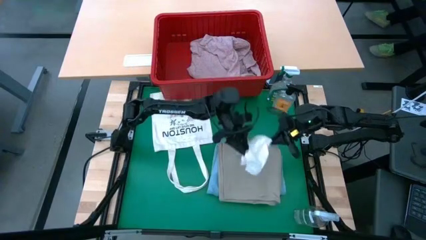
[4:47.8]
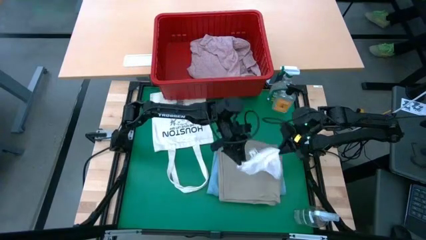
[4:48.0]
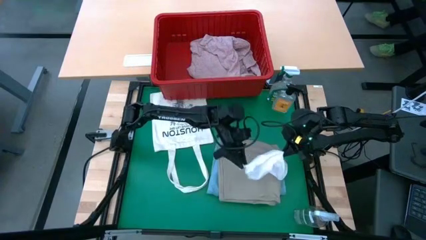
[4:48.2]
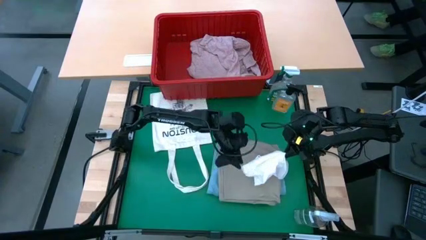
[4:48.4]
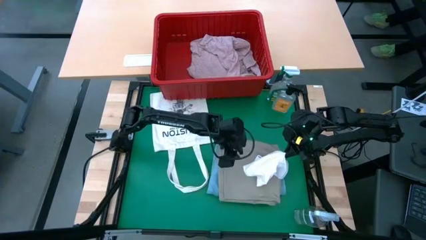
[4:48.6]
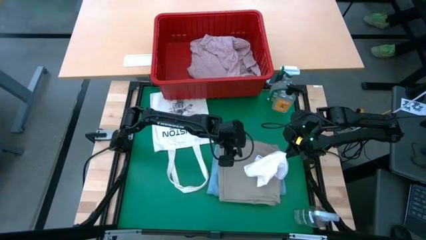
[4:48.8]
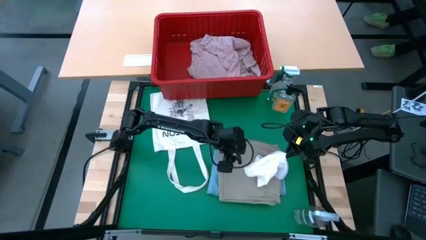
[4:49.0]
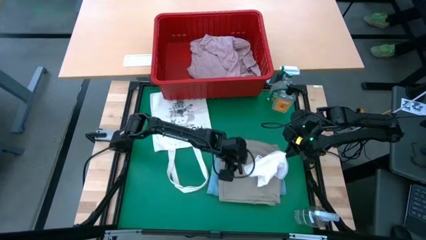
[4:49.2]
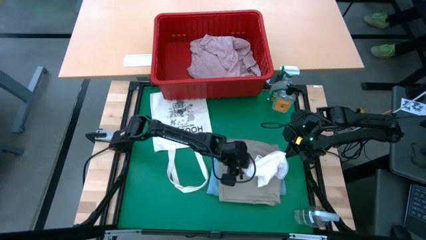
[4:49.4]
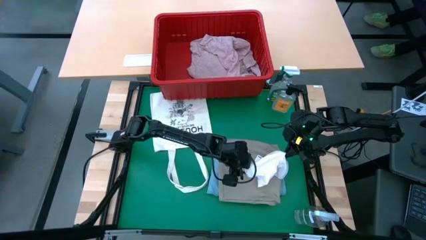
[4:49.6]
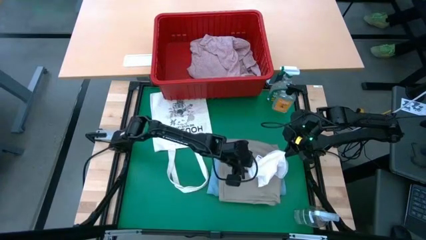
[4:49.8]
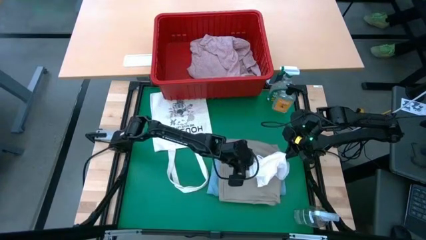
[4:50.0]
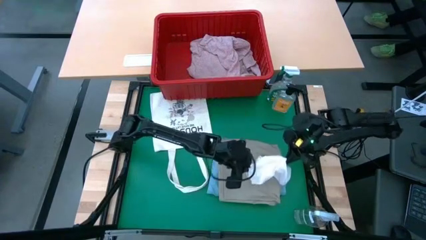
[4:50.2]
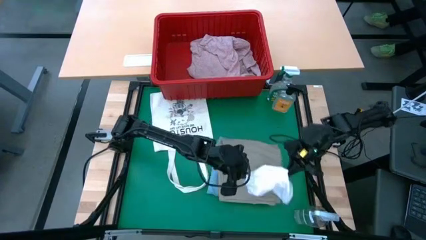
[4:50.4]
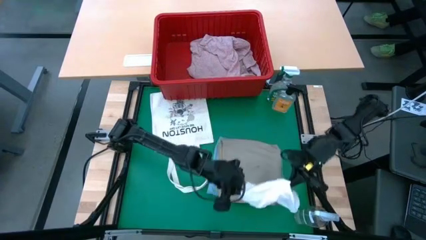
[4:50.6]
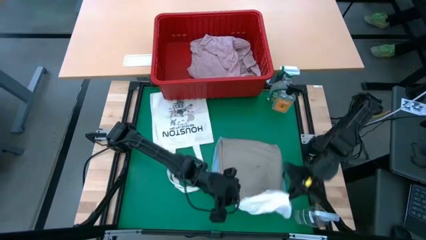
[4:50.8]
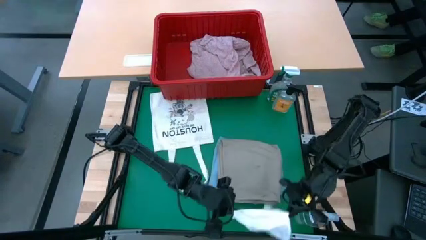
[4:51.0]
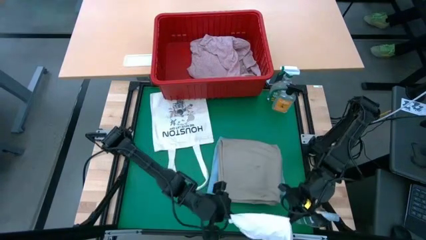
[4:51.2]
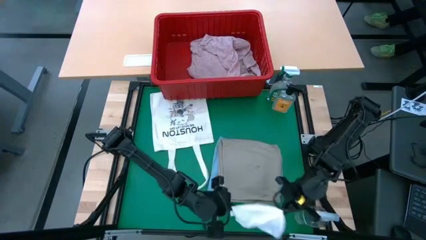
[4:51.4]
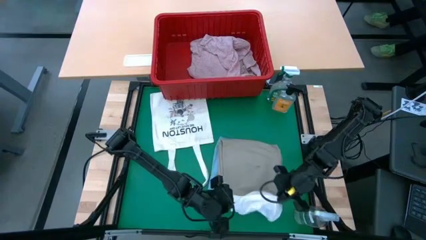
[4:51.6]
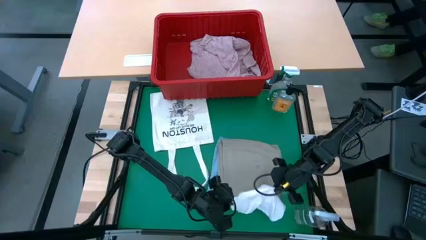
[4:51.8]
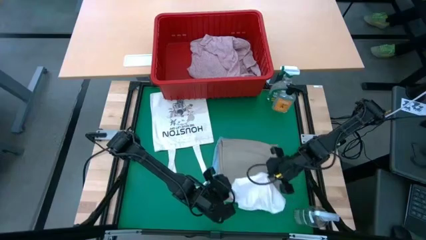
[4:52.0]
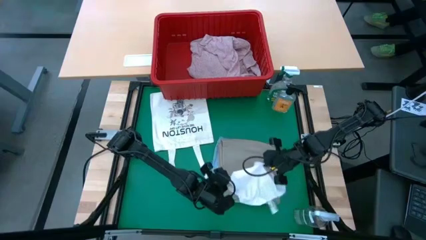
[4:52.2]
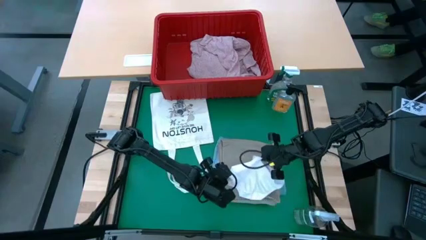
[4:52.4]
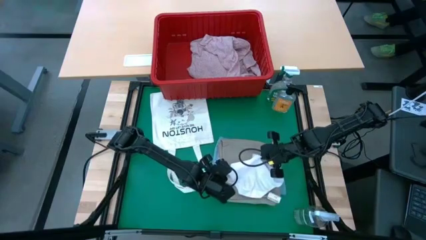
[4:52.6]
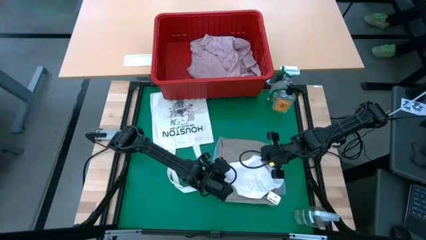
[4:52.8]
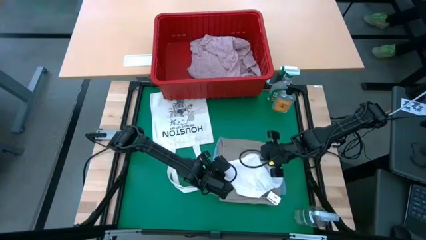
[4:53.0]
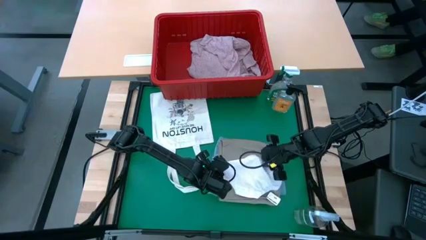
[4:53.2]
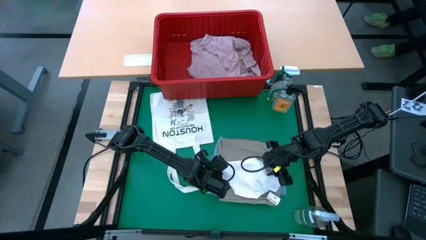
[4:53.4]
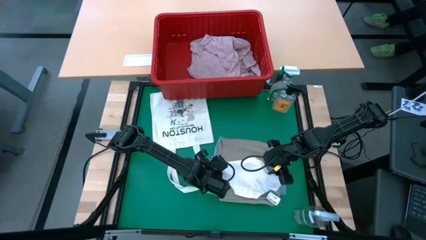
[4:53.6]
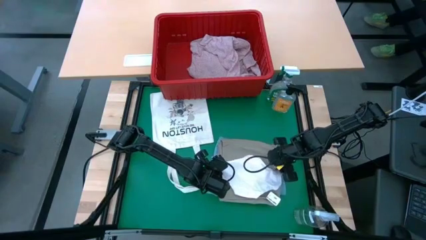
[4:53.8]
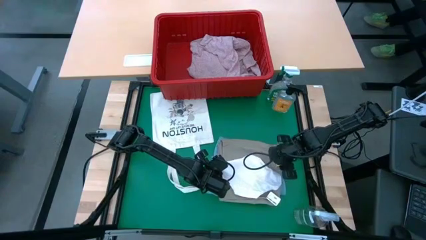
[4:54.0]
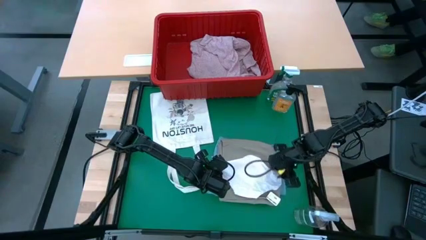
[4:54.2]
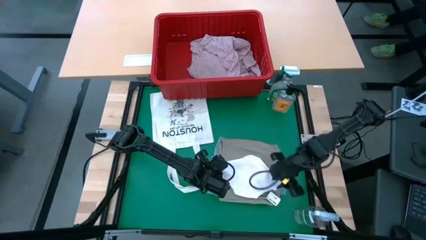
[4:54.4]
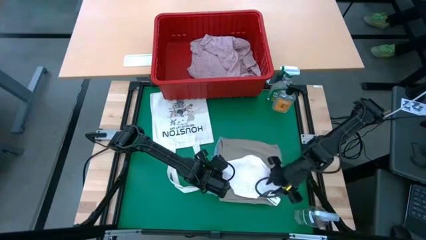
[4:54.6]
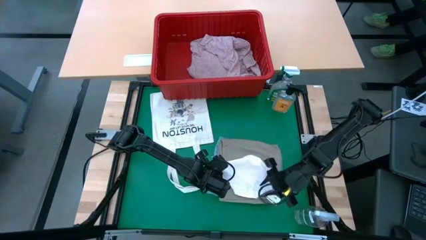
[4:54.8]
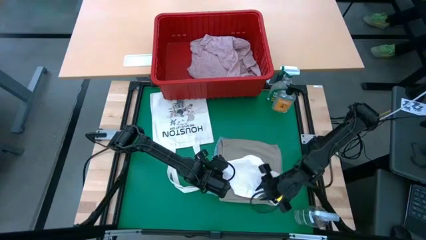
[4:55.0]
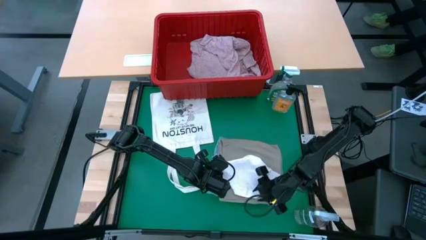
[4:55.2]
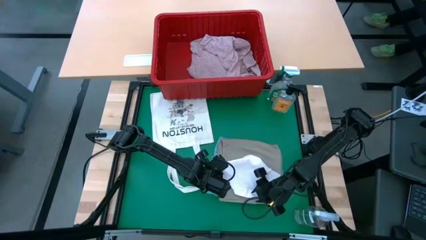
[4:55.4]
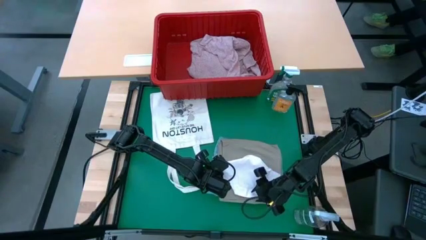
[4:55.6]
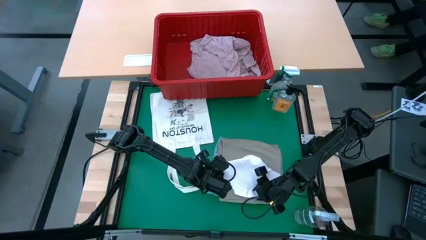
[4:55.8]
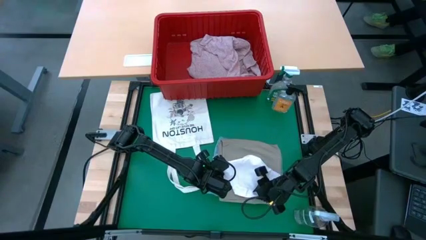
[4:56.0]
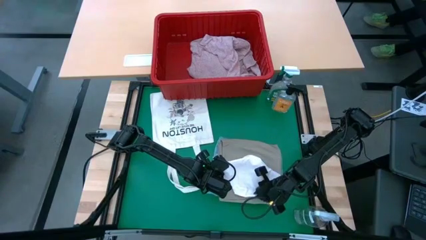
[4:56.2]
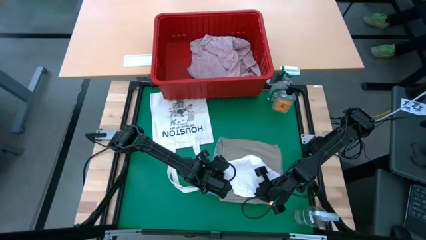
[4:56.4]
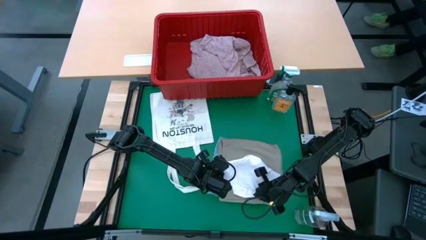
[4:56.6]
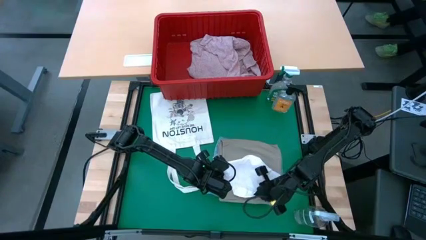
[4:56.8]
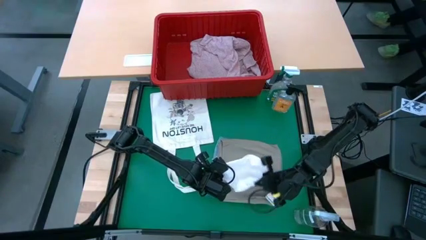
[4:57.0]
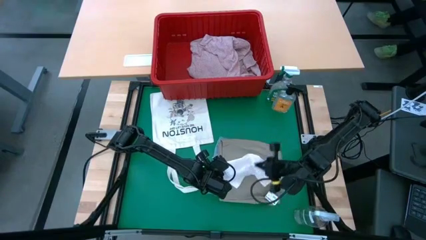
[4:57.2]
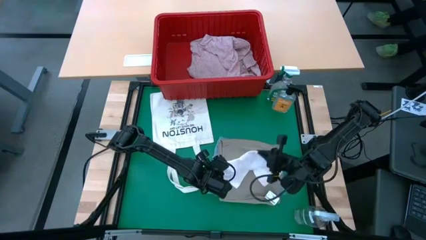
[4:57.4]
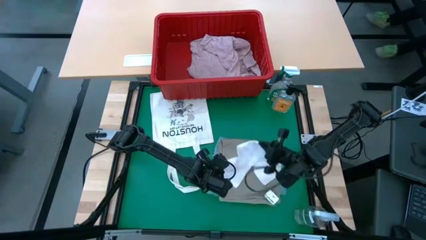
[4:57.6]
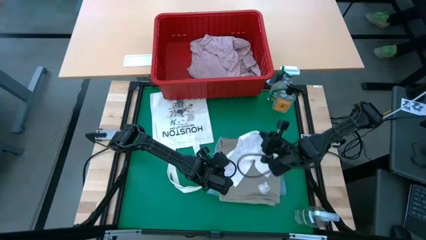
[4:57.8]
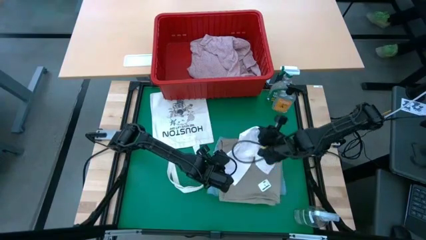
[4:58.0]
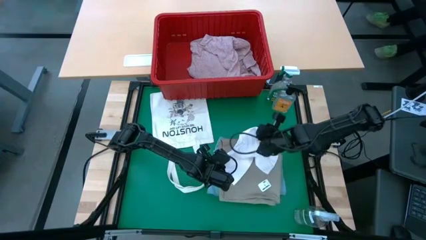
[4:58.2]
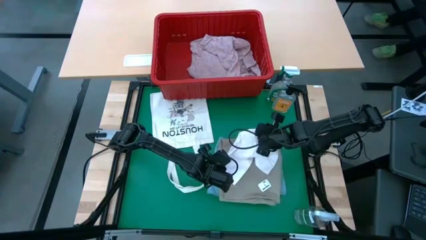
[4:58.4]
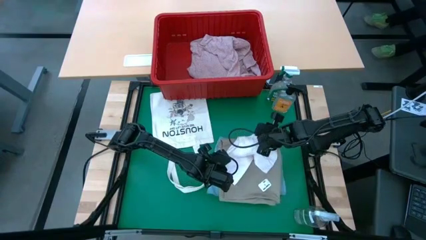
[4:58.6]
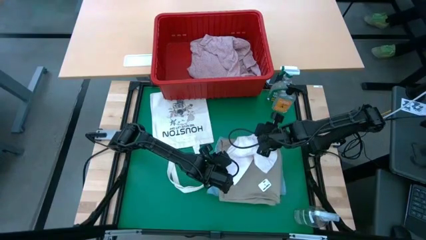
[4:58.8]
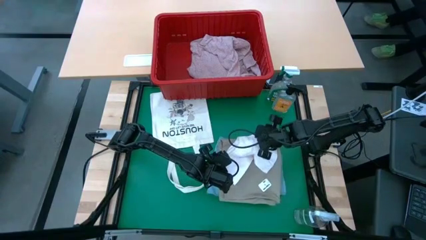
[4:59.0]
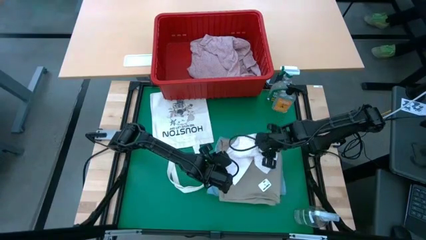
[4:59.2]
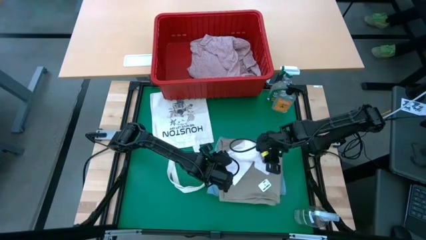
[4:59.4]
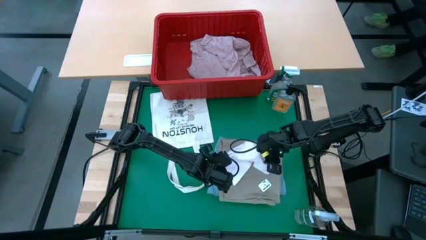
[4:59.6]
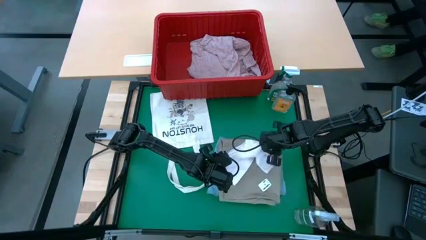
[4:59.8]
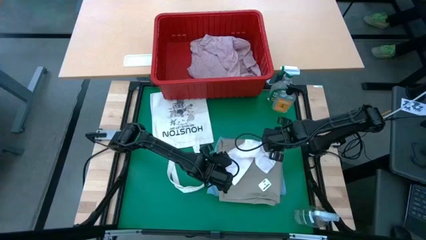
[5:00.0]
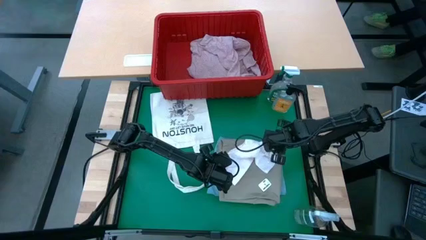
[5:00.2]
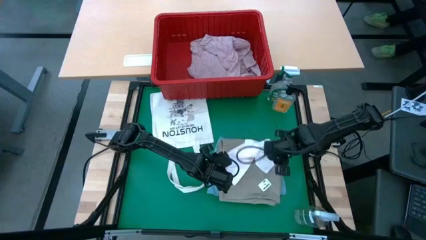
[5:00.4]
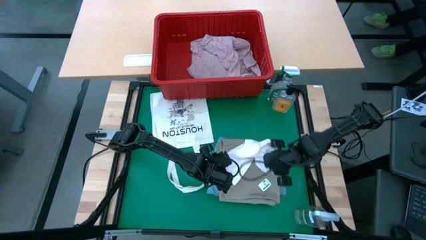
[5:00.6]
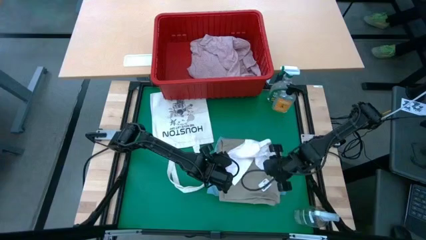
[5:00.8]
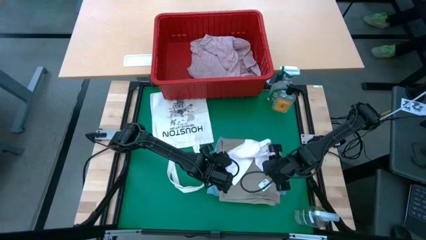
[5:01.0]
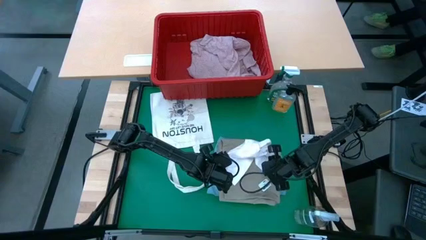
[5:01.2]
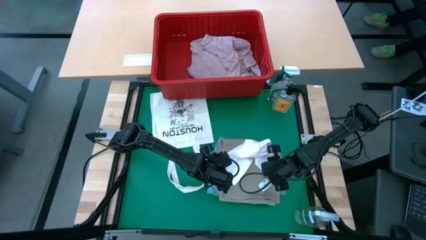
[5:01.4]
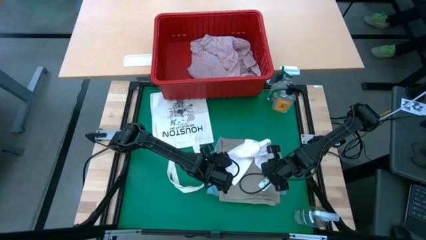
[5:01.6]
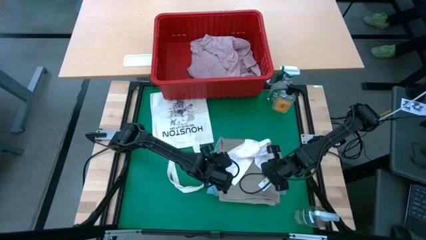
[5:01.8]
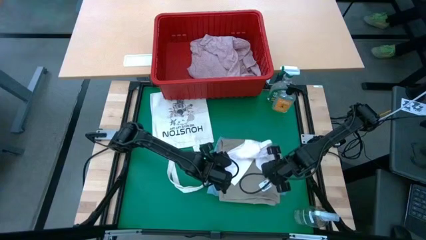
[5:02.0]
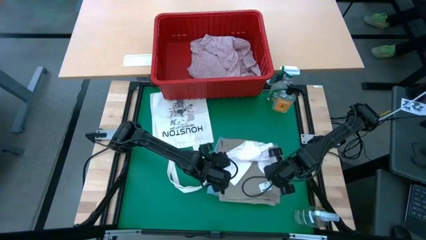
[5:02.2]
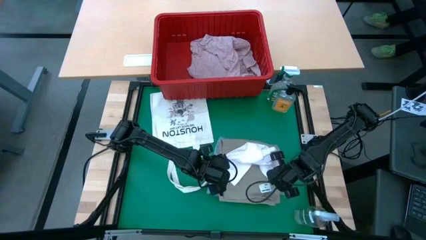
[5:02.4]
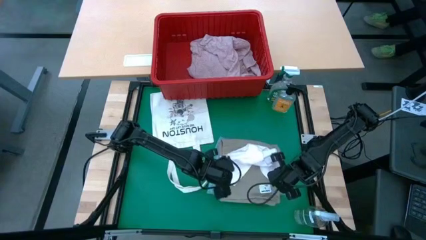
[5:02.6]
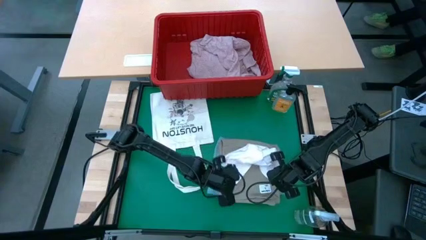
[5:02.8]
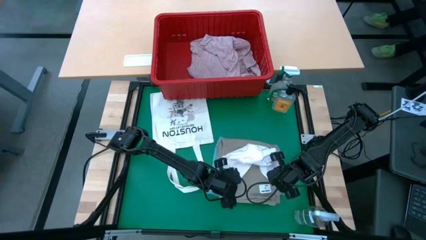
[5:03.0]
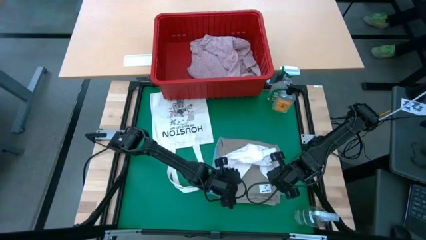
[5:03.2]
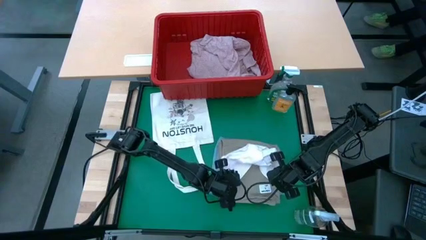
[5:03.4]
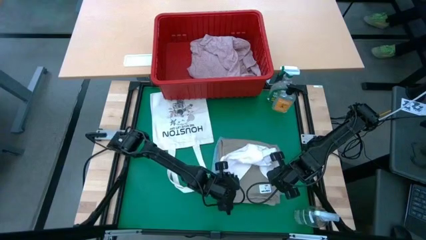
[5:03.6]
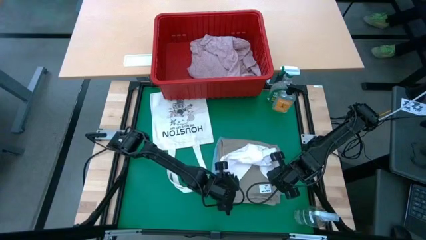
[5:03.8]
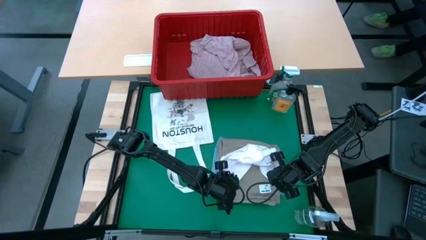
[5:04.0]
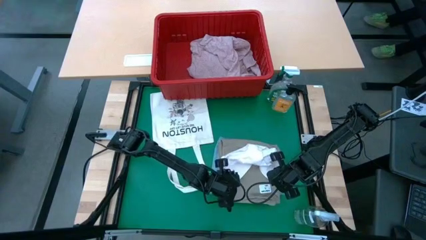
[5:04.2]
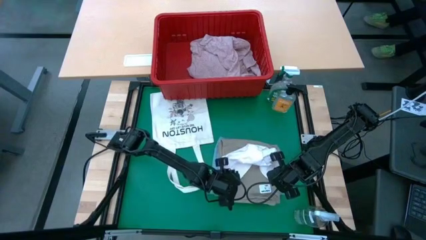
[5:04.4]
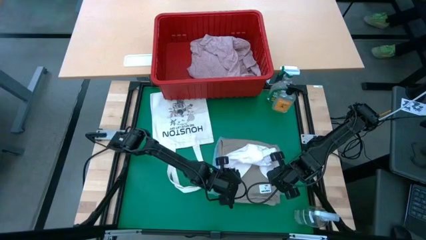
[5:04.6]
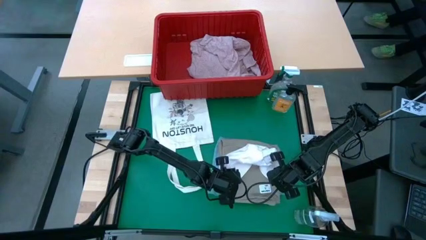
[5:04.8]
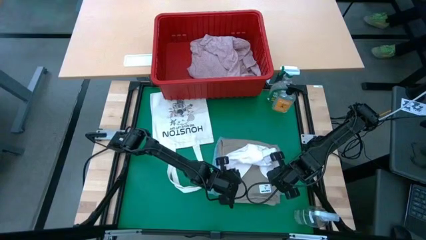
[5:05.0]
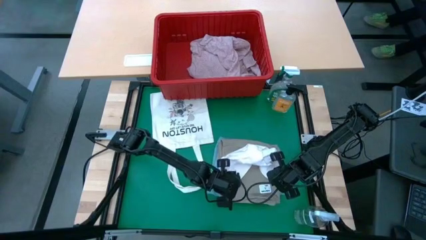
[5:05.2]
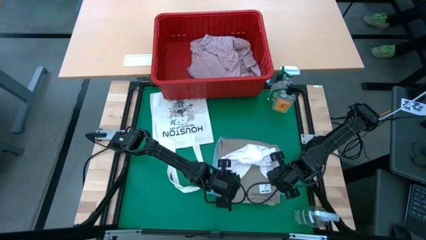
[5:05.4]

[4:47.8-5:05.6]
Task: Fold laundry
Fold the white underwear
